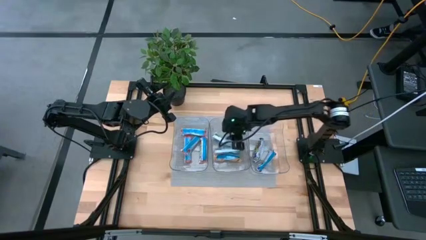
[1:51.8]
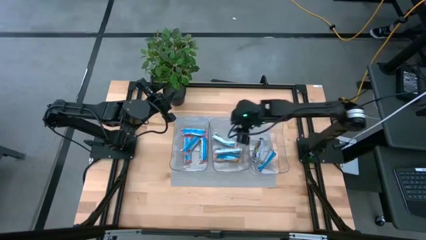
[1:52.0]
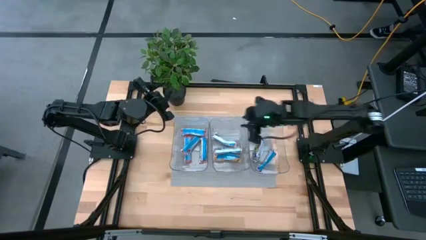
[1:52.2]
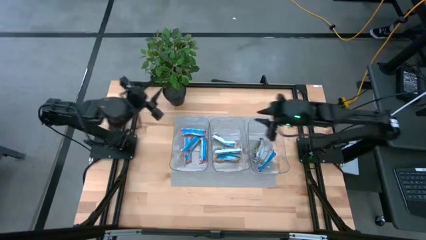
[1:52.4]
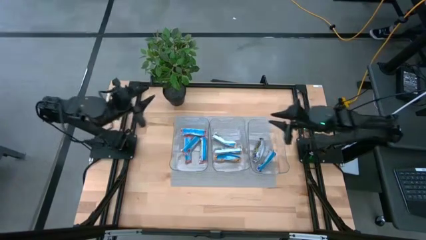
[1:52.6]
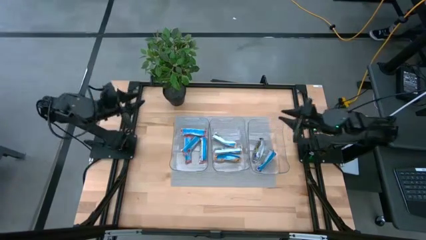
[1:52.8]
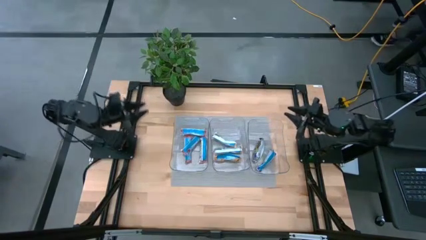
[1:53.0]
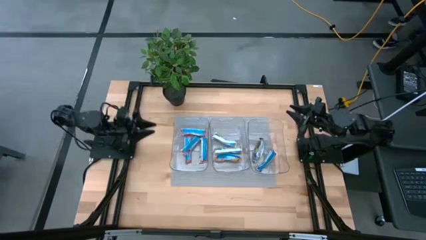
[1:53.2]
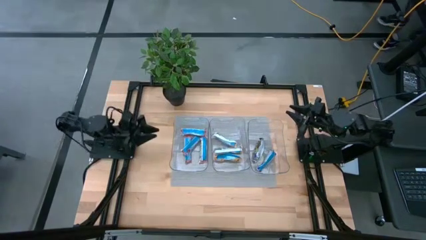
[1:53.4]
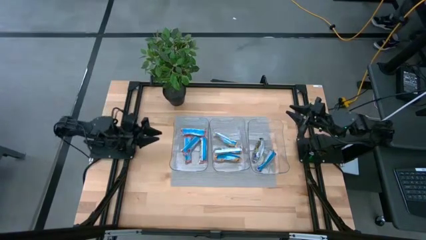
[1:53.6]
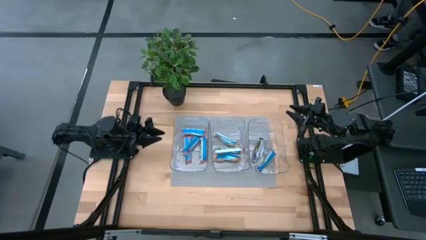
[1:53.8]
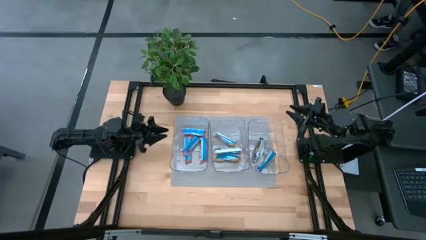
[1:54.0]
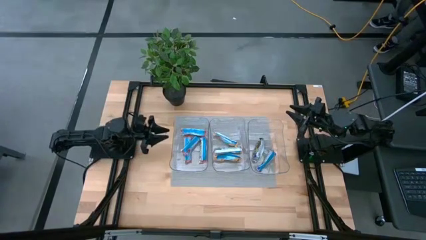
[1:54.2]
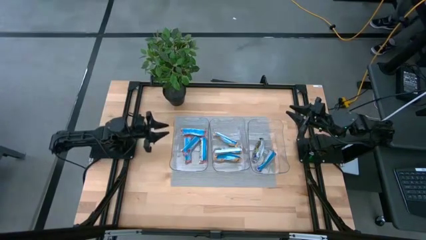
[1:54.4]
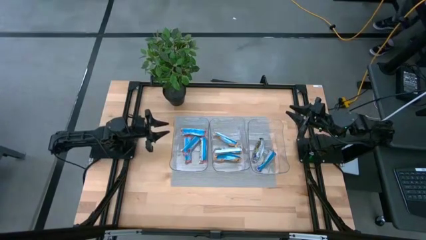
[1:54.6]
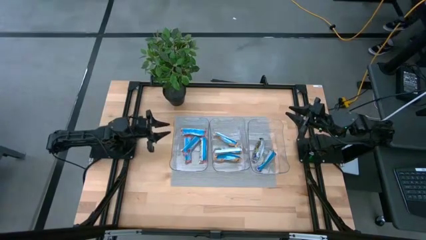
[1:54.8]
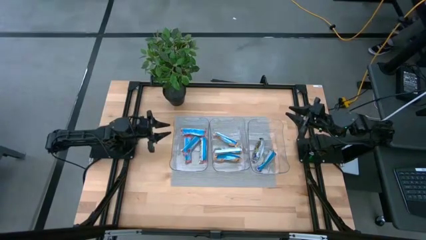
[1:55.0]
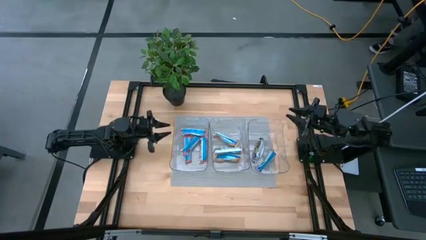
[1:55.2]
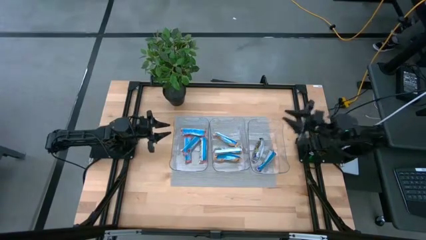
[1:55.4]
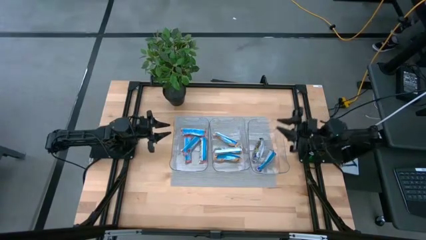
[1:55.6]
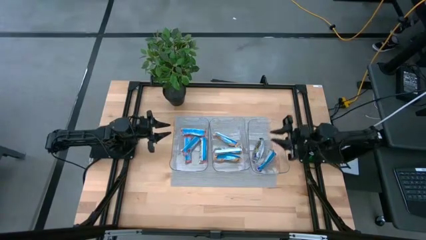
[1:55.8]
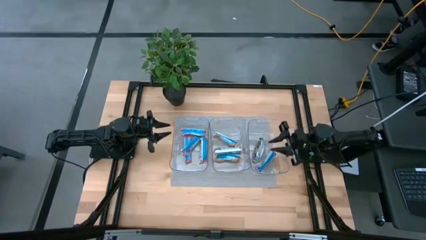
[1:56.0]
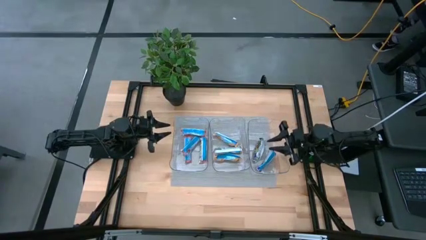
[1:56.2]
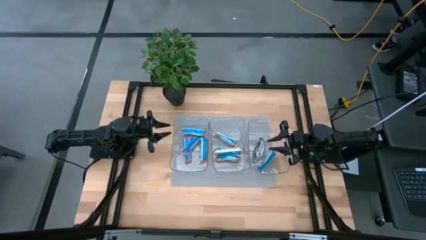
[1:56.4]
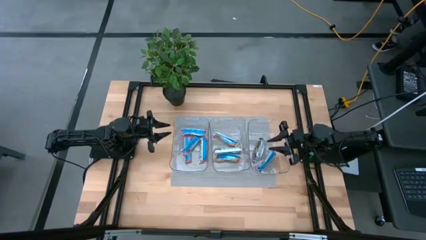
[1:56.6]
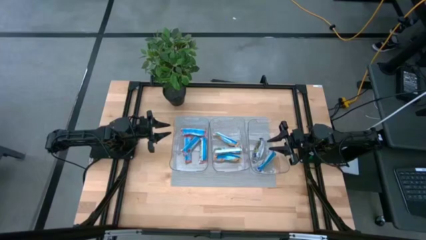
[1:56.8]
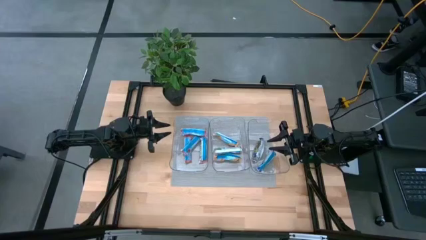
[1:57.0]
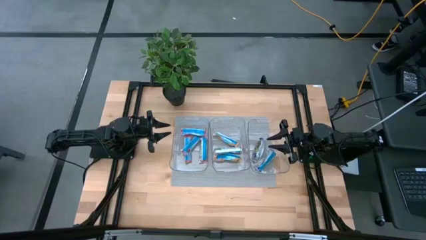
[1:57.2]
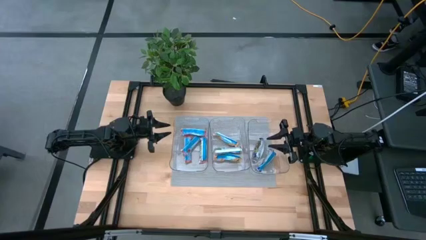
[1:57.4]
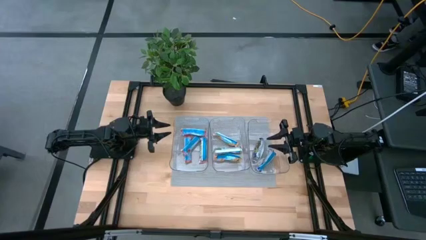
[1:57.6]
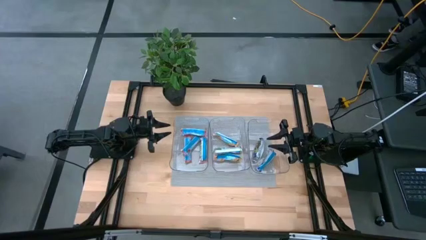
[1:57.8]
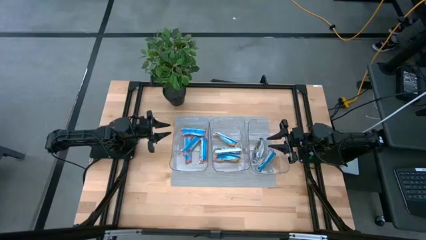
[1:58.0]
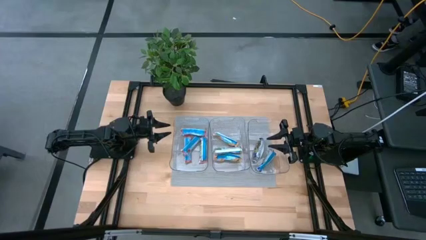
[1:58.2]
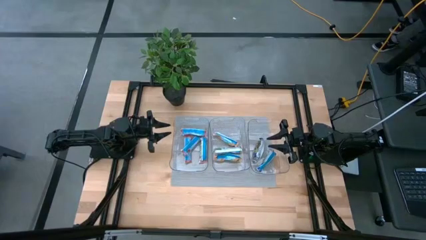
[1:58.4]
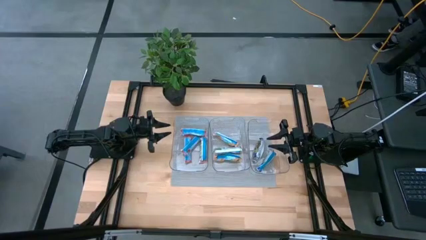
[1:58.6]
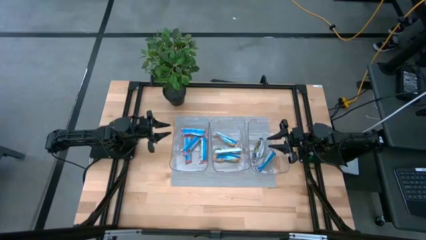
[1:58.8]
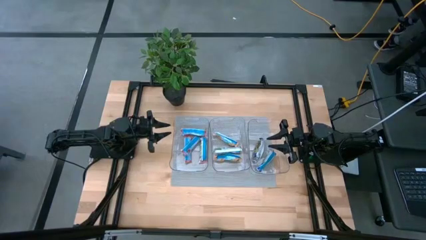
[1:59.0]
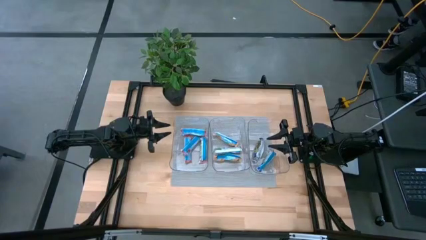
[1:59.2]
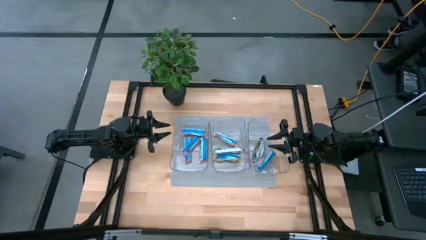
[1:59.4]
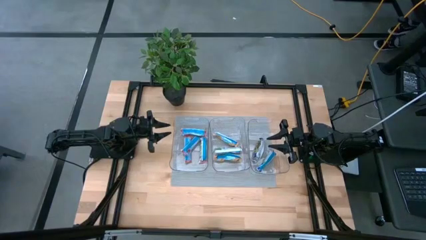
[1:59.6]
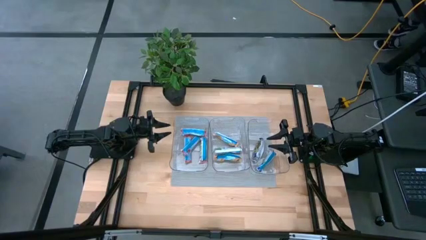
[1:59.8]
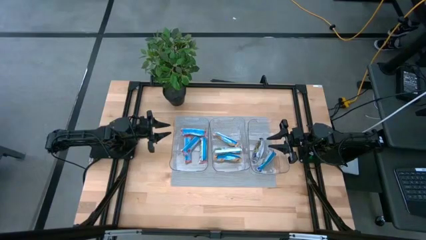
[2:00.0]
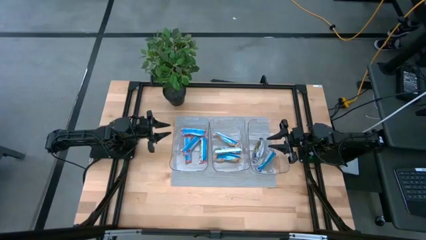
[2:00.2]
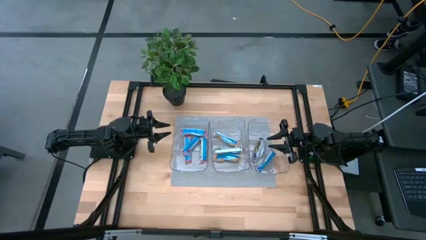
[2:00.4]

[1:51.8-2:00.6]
Task: Pick and place Granola Bars by type
Return to Home Position

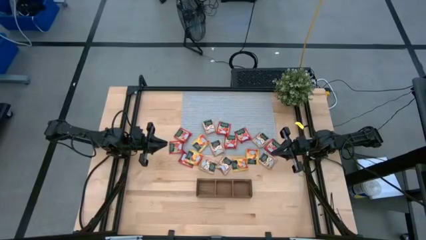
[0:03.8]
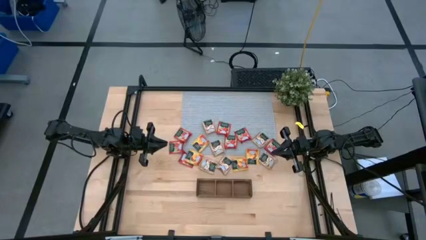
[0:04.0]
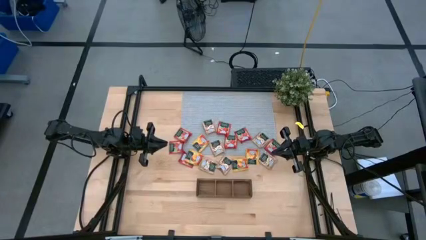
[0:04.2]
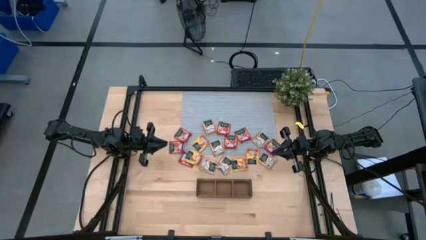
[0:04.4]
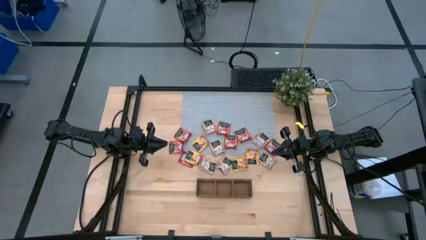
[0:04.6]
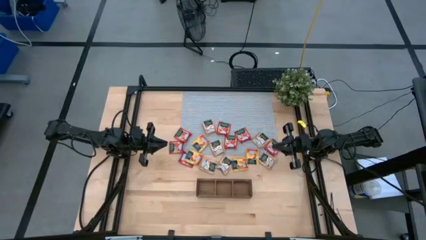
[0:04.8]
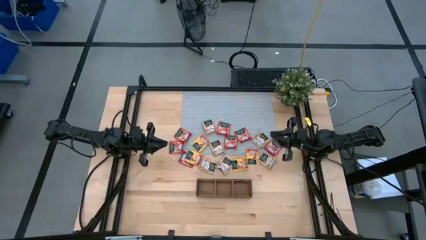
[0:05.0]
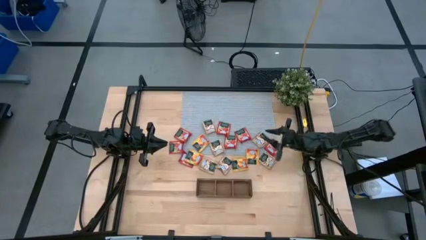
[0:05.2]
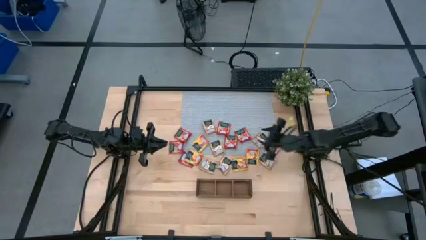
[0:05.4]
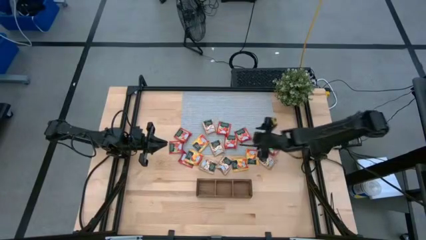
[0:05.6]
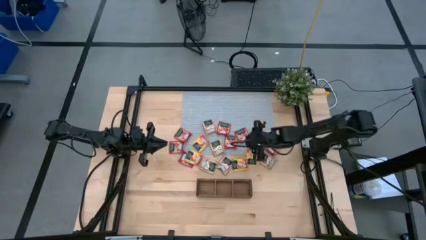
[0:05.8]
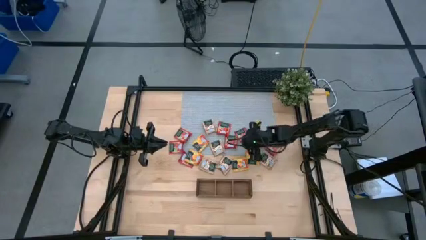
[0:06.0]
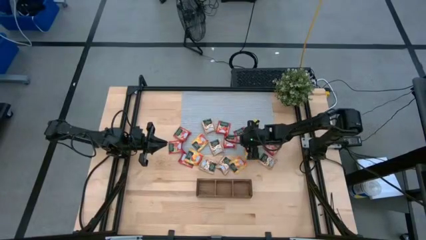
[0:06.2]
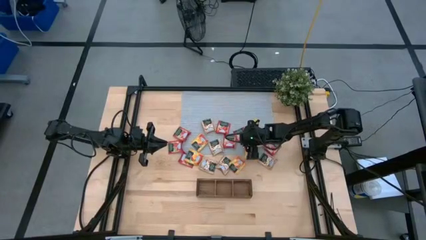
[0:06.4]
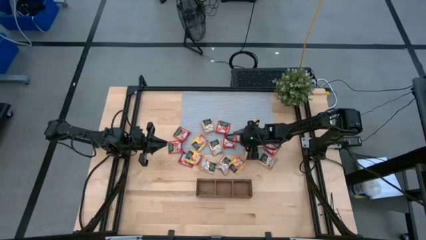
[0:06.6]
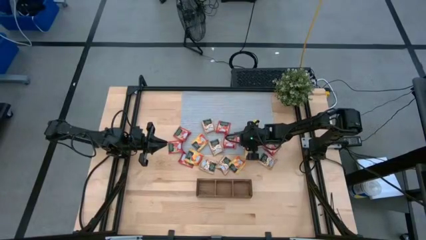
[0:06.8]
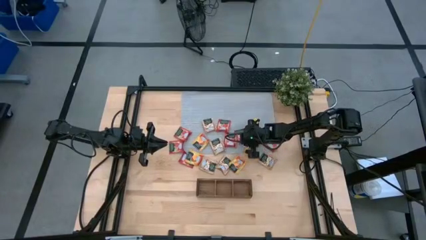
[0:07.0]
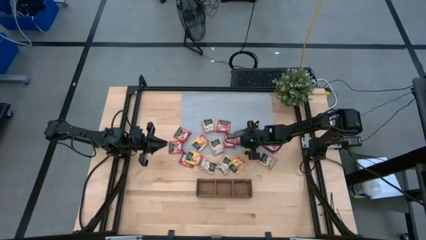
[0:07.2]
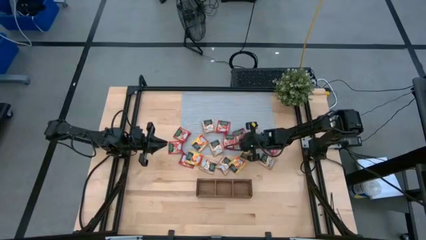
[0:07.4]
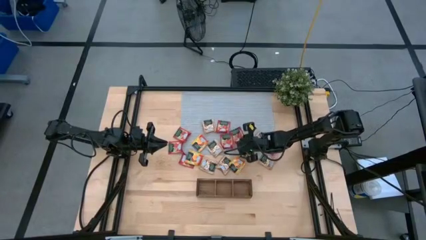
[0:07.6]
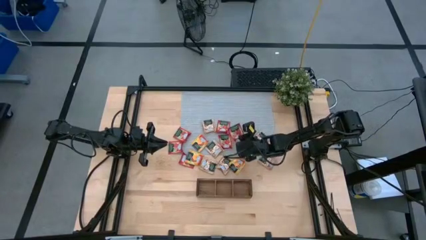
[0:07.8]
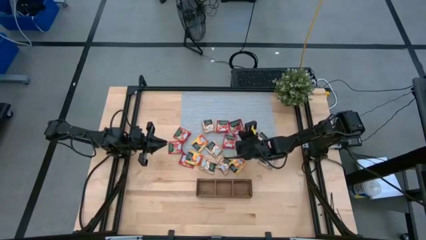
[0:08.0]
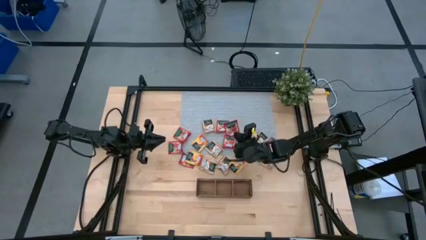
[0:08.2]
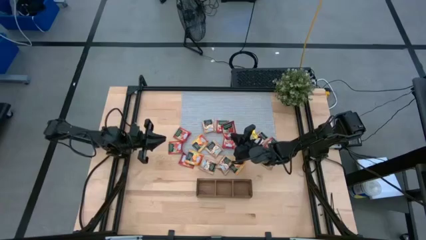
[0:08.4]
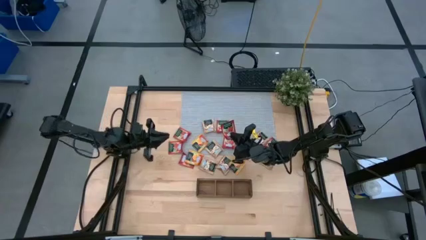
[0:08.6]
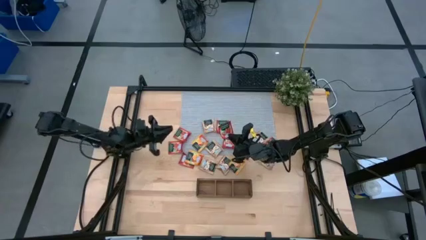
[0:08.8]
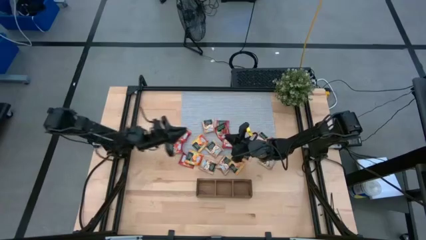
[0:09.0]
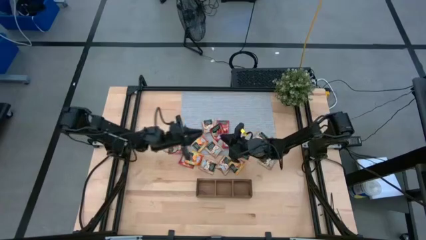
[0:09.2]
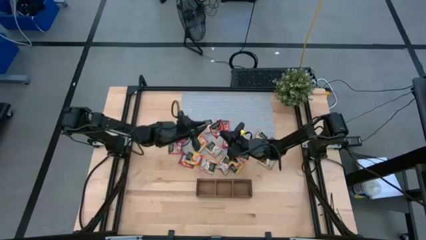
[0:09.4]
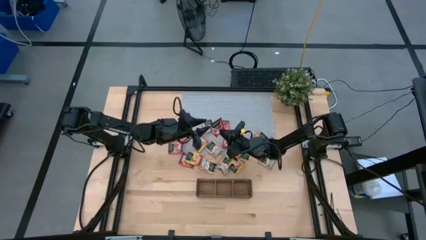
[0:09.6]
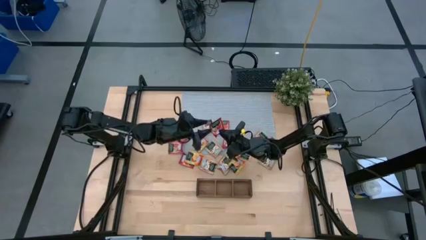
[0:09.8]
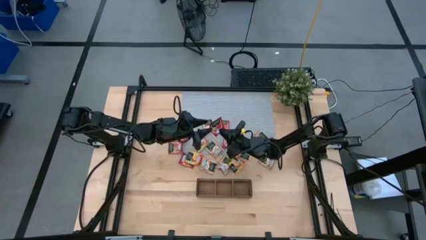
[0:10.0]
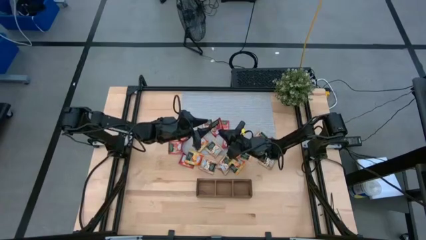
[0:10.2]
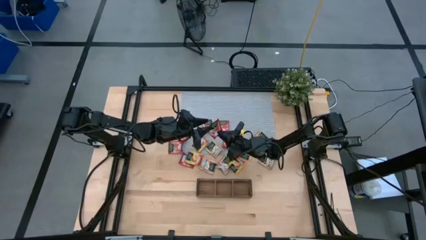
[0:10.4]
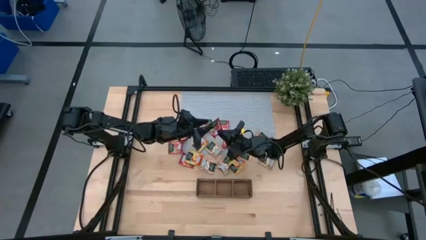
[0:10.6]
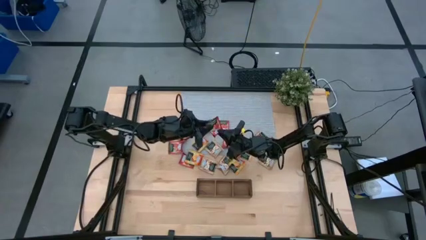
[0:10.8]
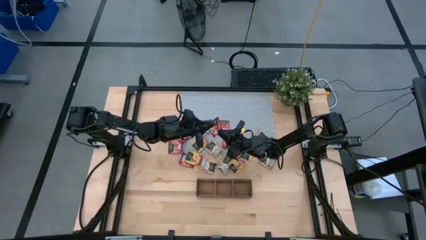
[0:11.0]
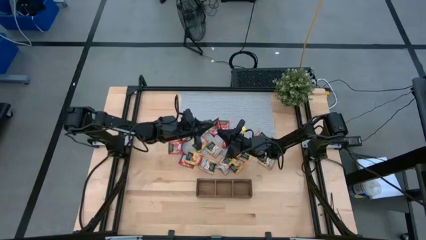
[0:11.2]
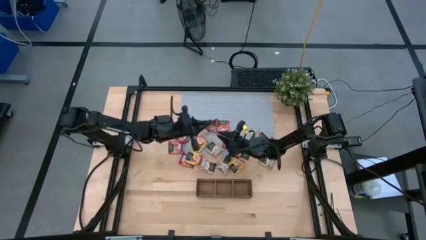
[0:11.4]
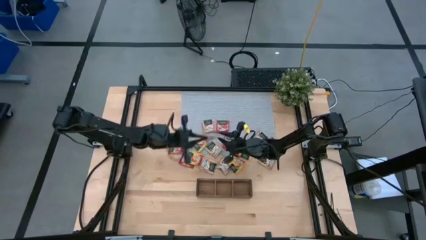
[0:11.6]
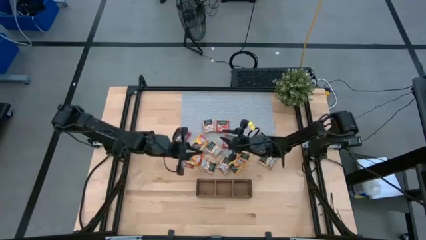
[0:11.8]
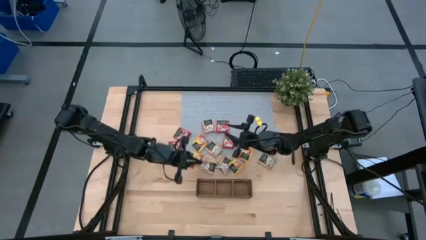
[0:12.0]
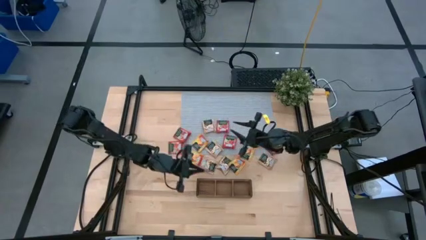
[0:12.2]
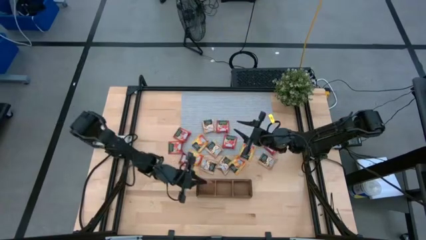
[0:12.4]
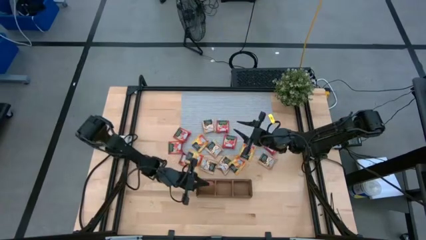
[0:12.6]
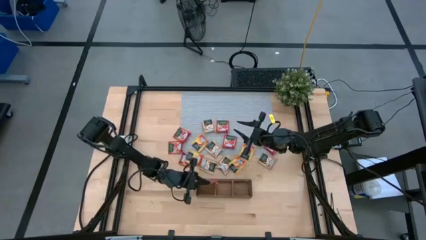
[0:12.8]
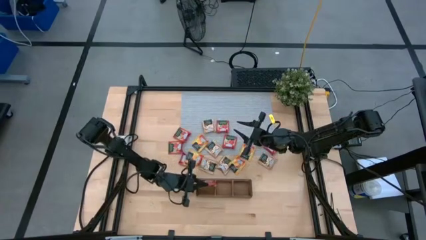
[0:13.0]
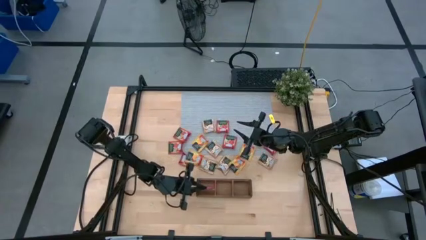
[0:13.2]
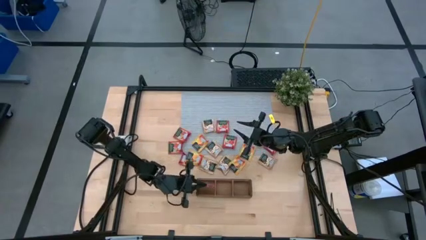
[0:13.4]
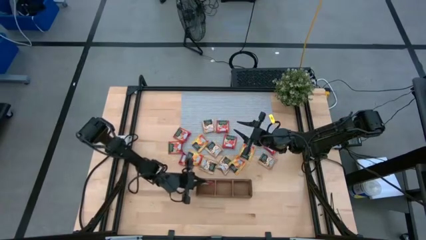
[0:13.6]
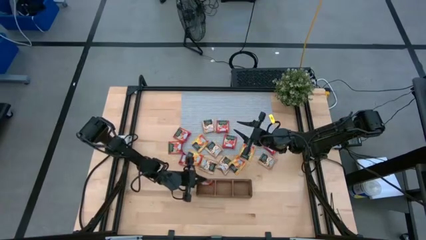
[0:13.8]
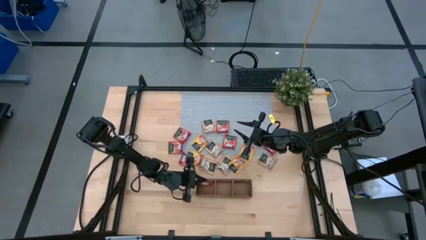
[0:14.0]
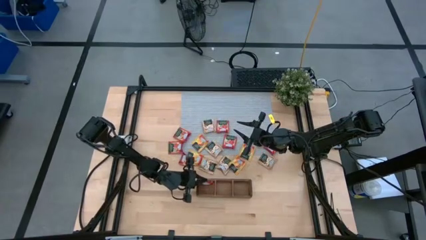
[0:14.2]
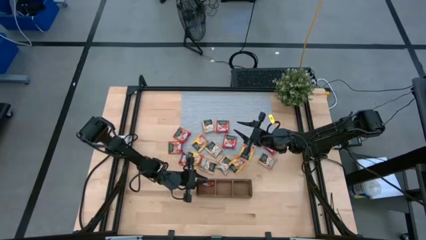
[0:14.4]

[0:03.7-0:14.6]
Task: Pick & Place Tea
Put the red tea bag into the left section of the wooden organizer
